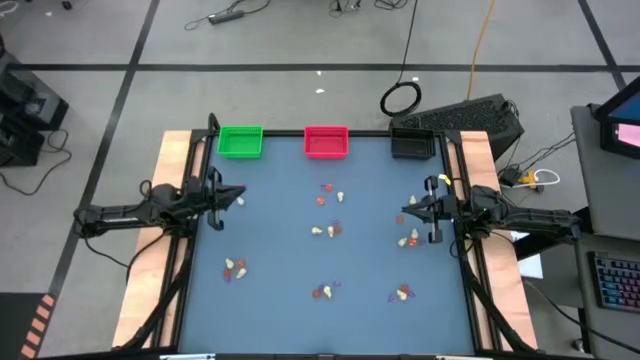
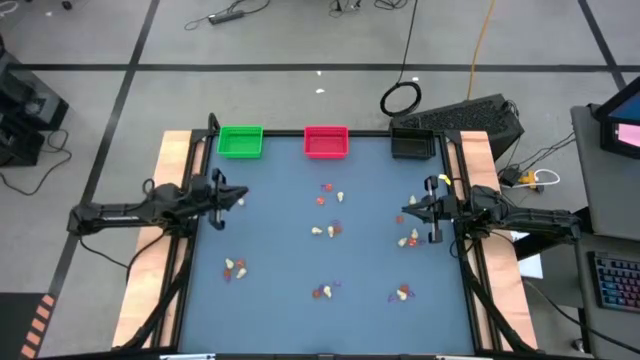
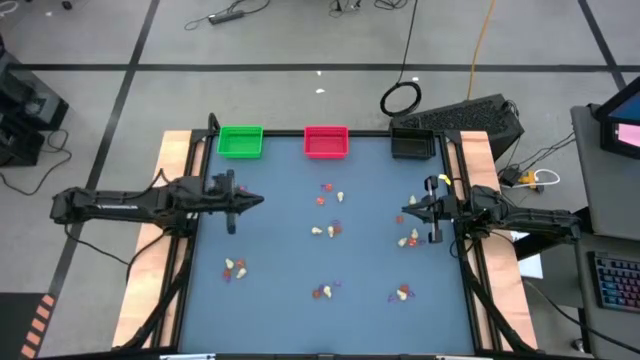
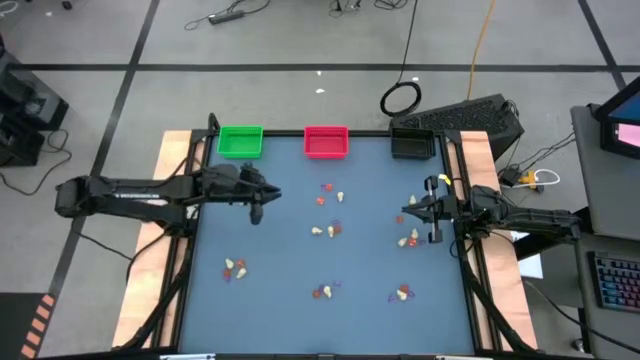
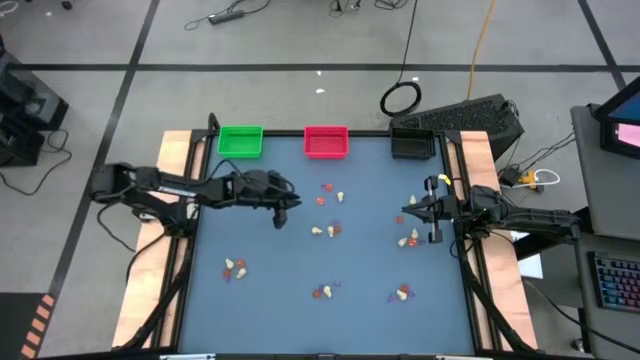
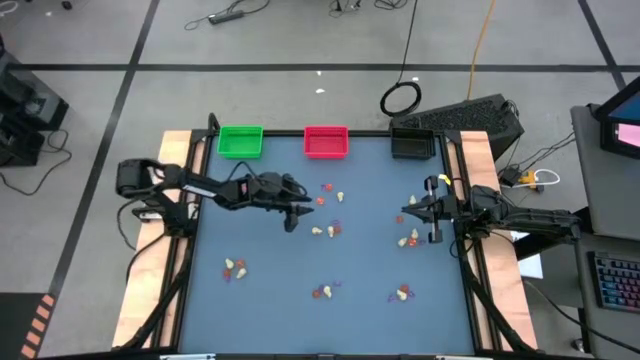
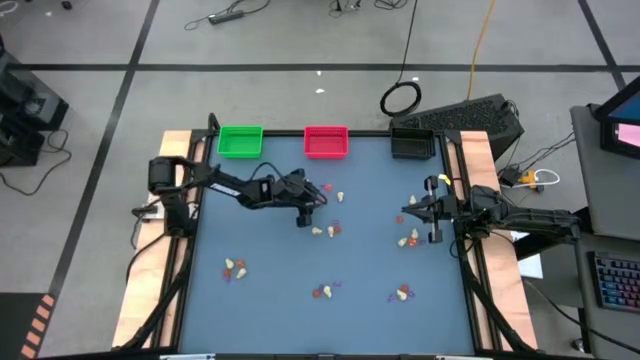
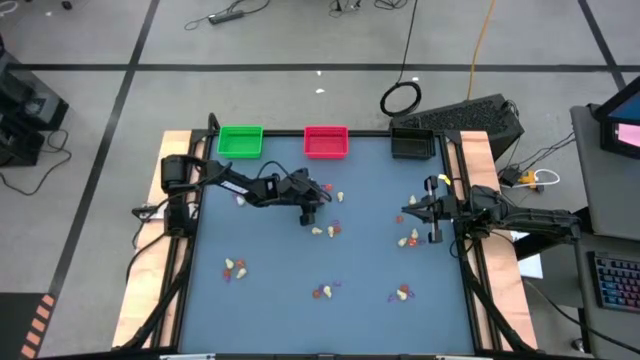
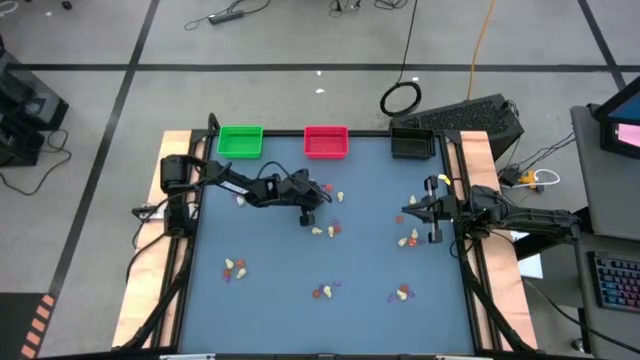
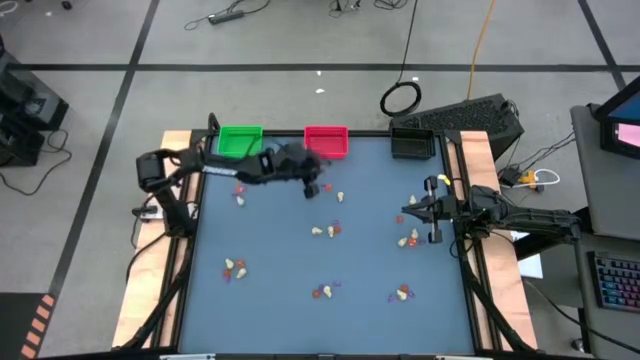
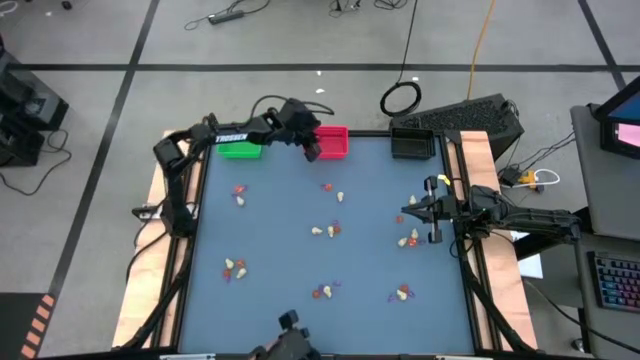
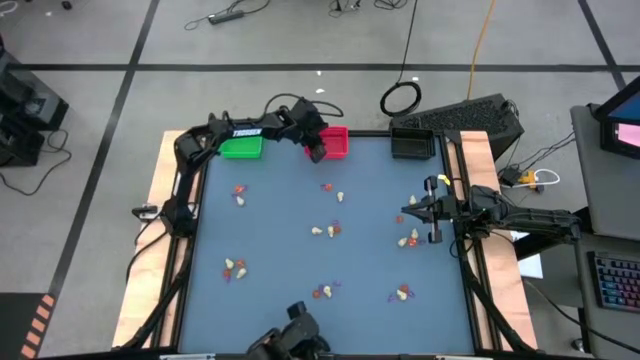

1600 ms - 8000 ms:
Task: Sort Halloween decoration
Put the orange pumpkin toy into the red bin

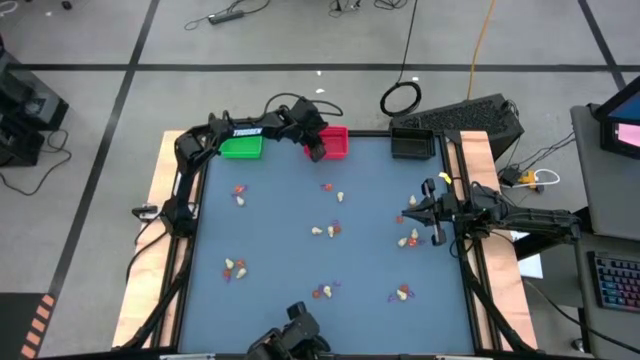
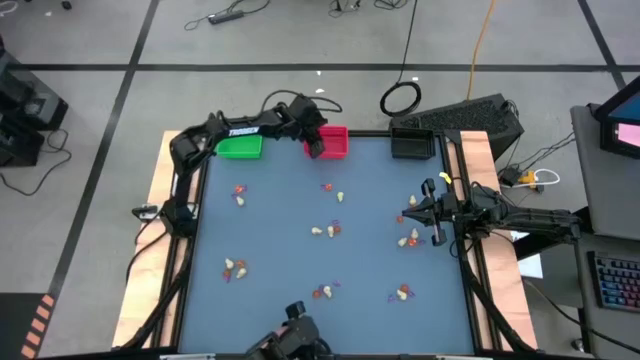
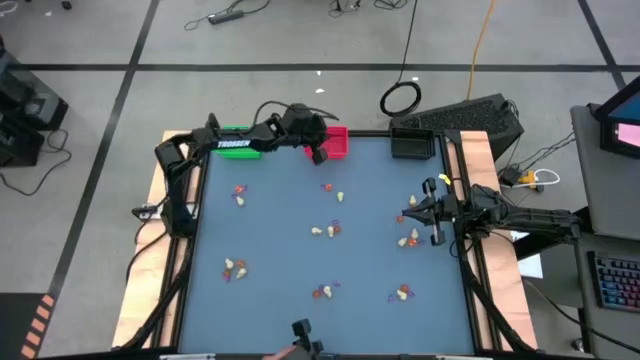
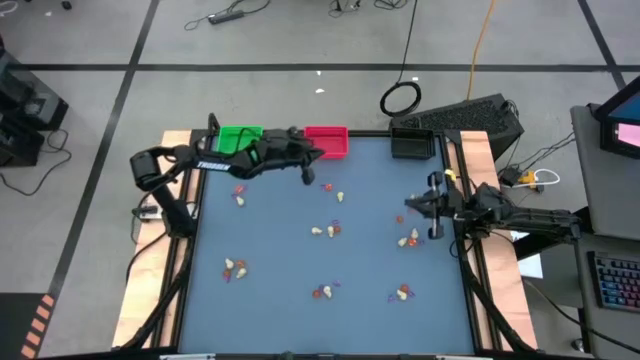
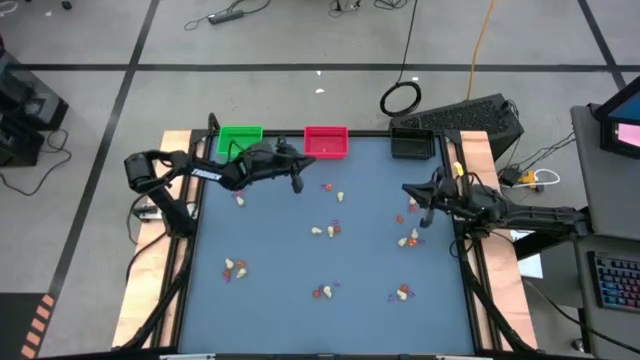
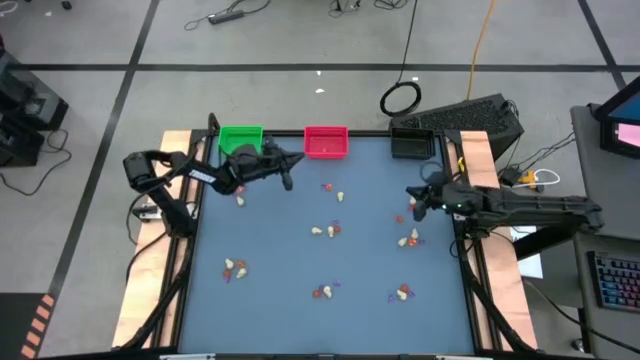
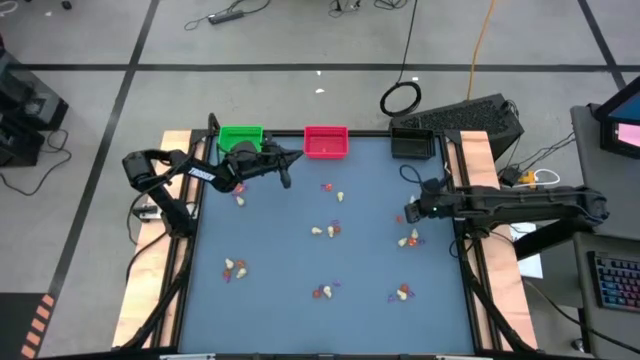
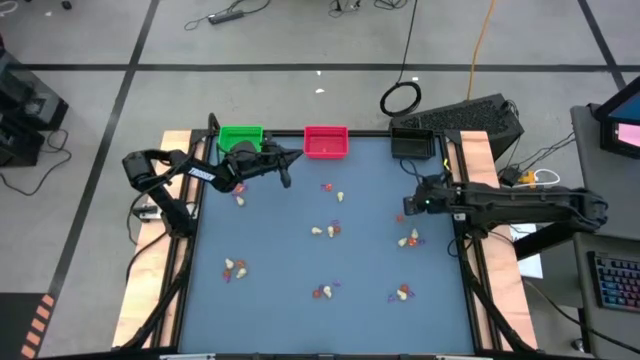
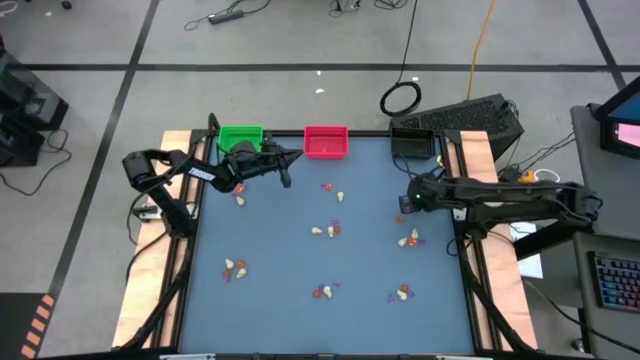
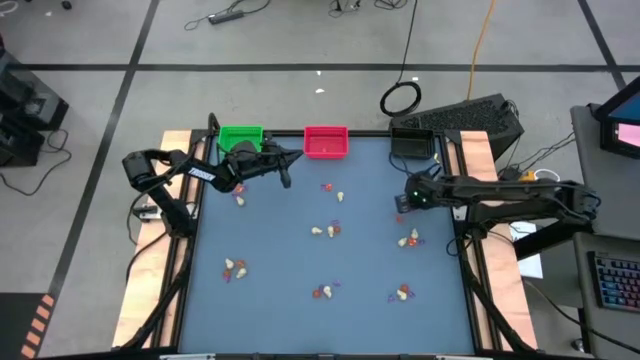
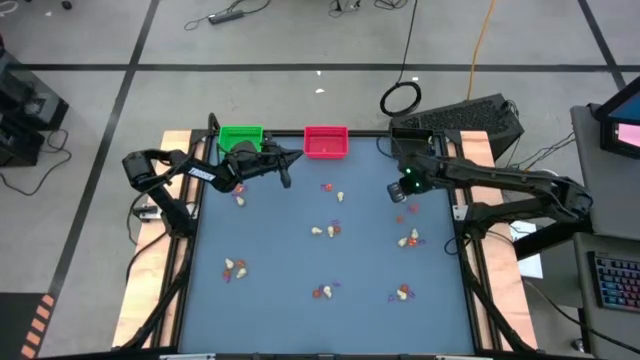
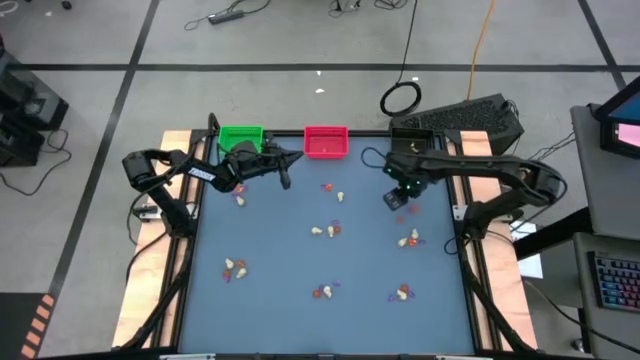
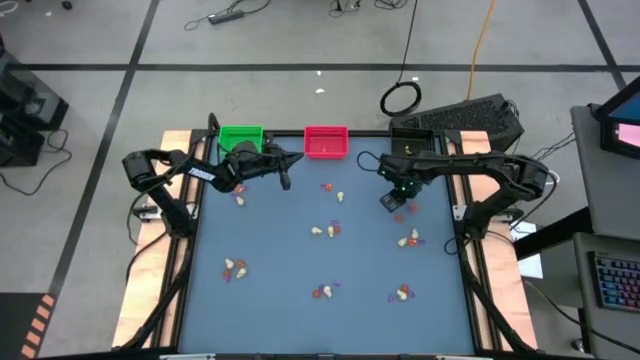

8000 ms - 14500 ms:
Put the white skull toy into the black bin

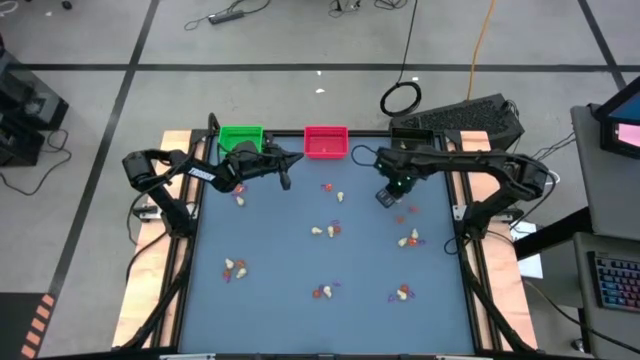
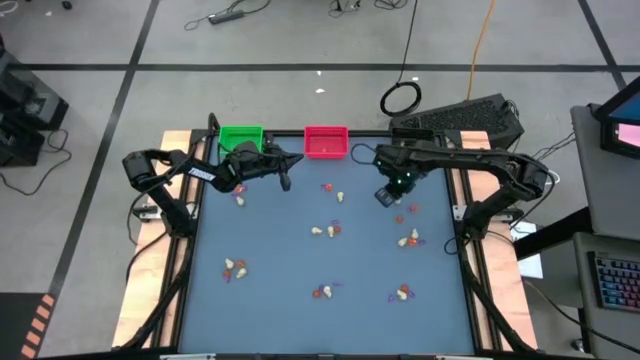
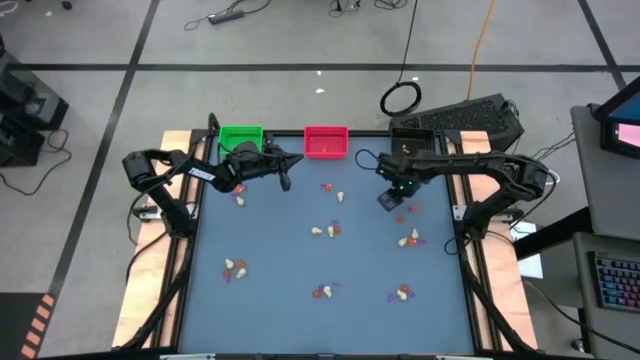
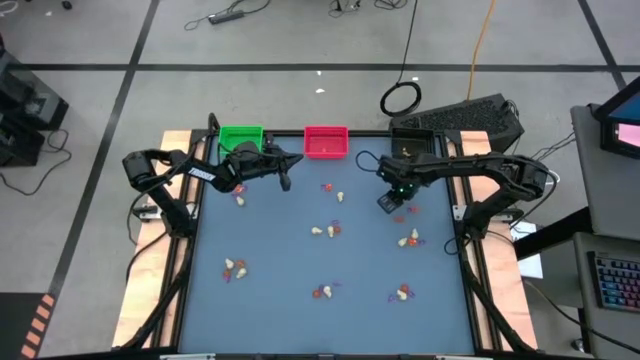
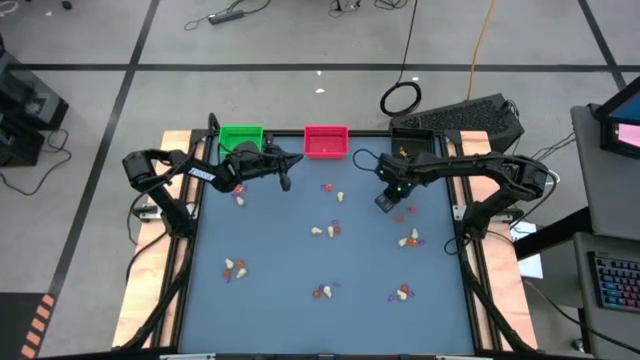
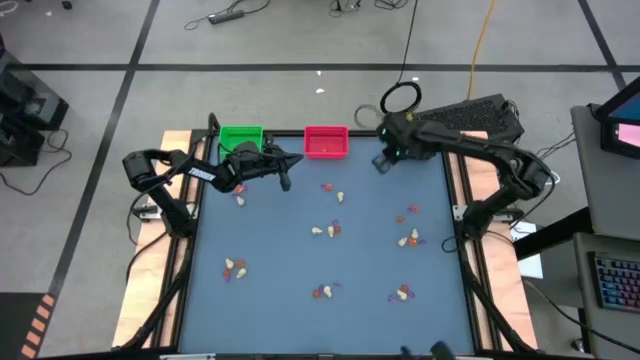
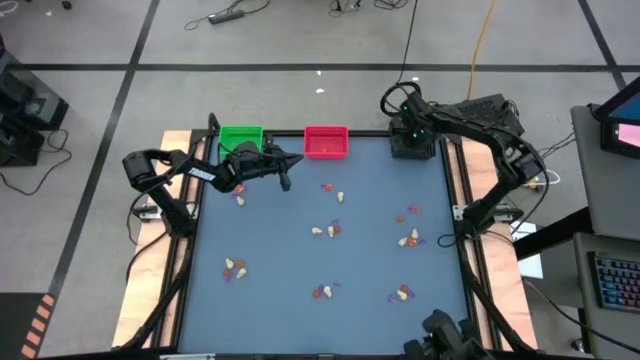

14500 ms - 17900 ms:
Put the white skull toy into the black bin

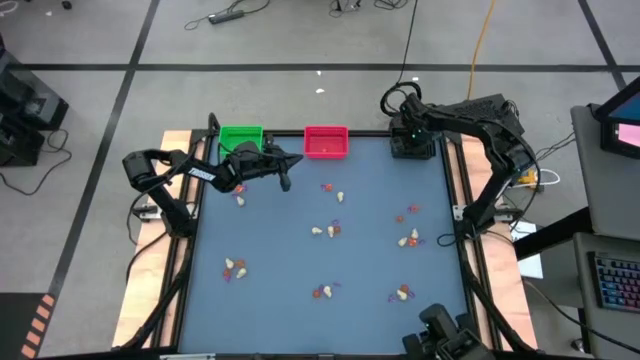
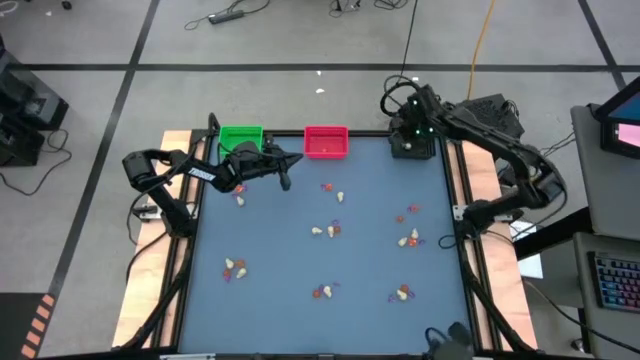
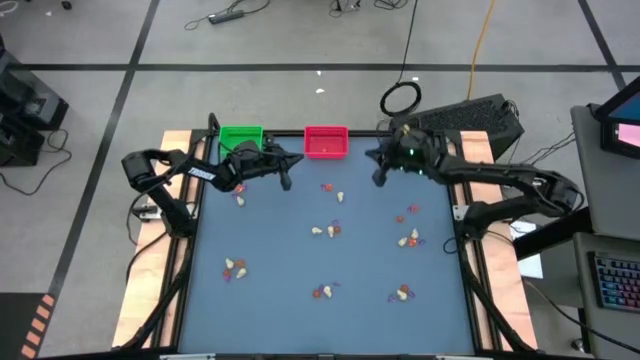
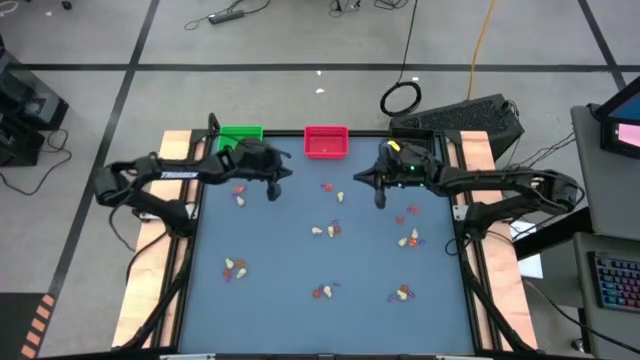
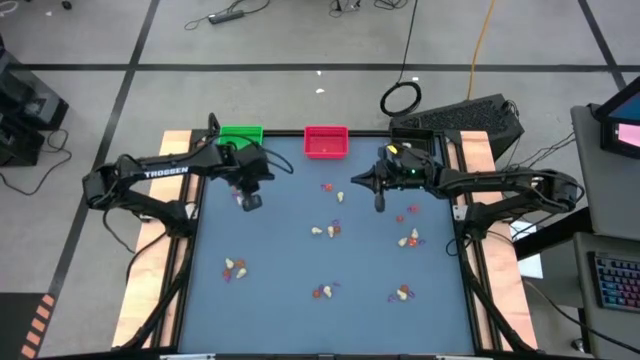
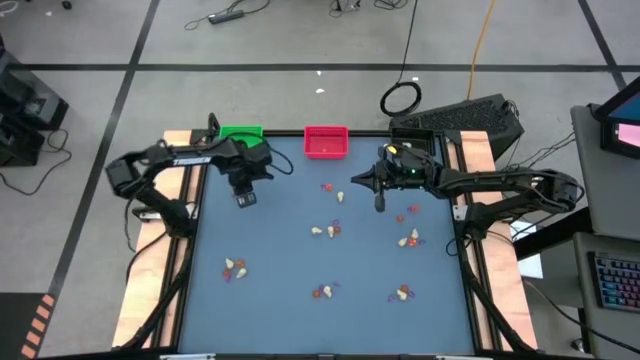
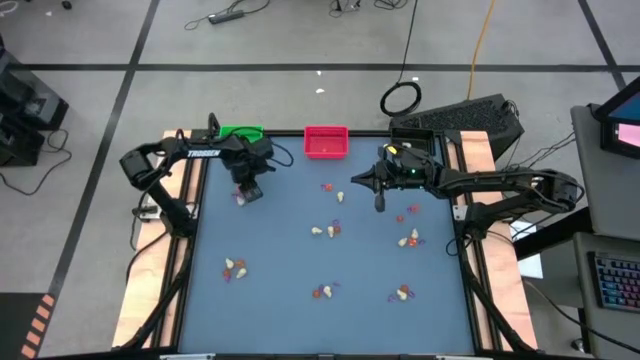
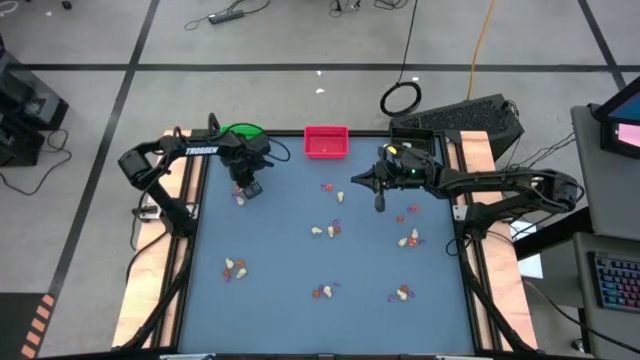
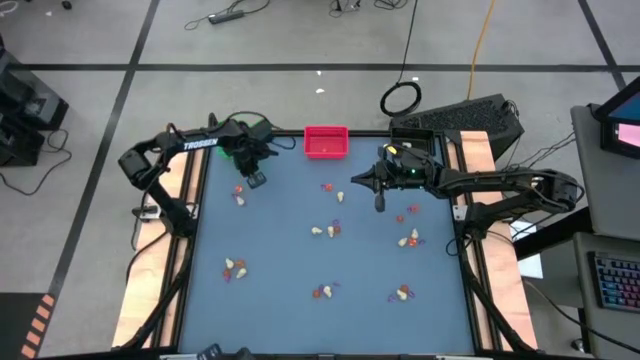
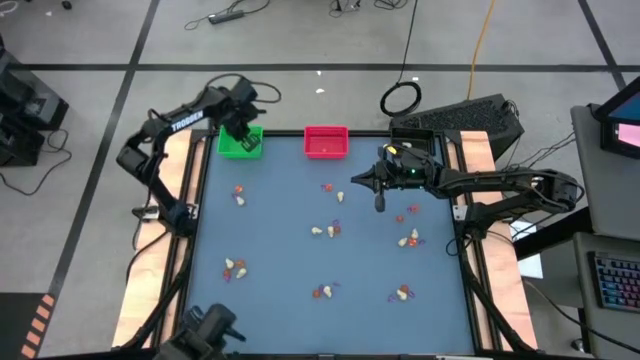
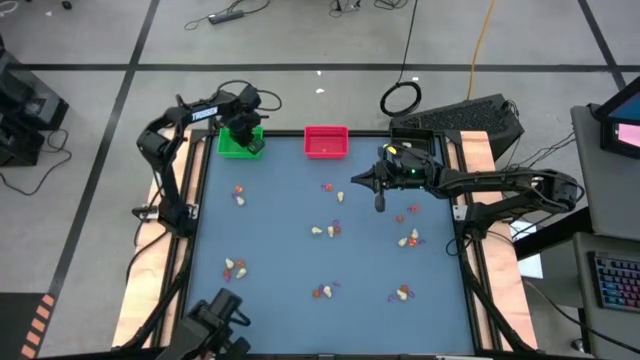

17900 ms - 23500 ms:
Put the purple witch hat toy into the green bin
